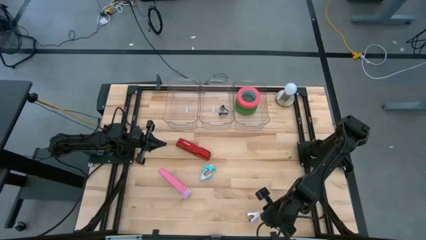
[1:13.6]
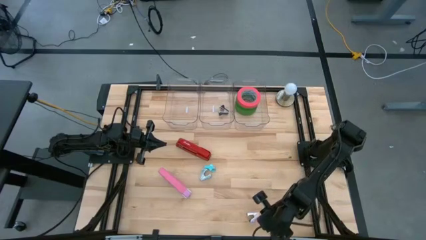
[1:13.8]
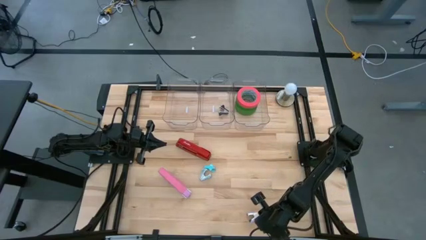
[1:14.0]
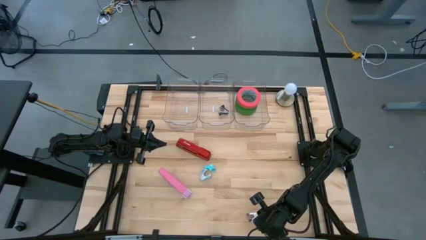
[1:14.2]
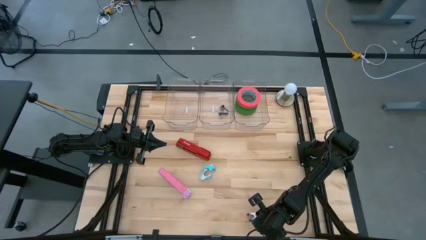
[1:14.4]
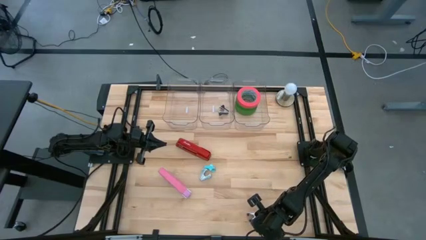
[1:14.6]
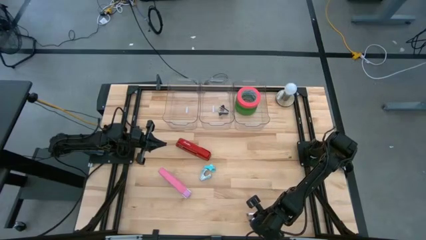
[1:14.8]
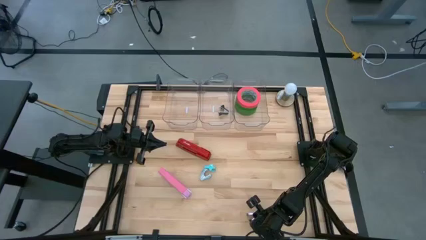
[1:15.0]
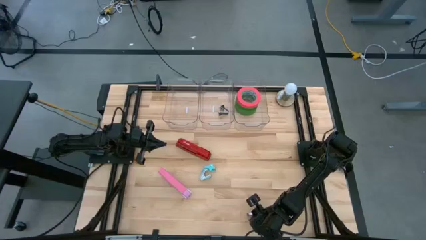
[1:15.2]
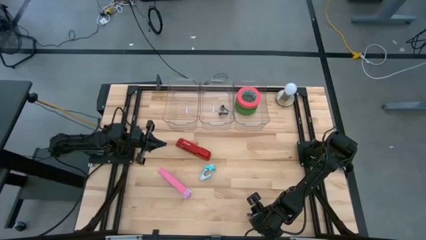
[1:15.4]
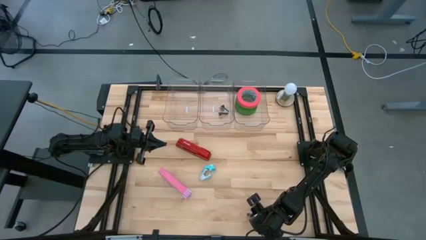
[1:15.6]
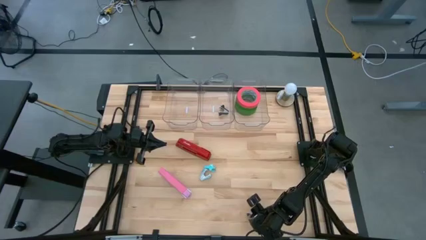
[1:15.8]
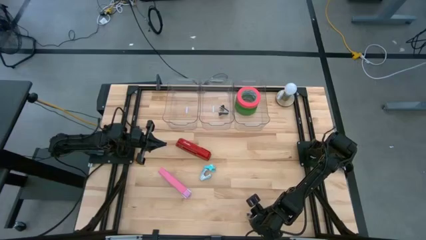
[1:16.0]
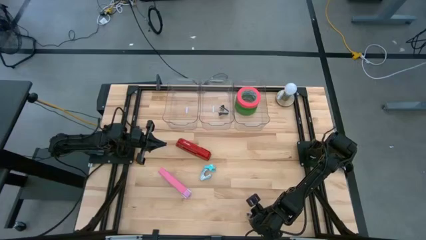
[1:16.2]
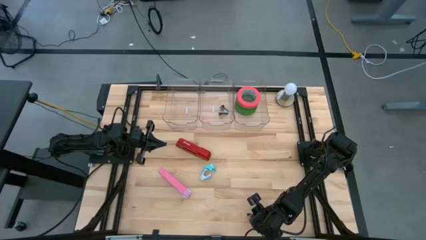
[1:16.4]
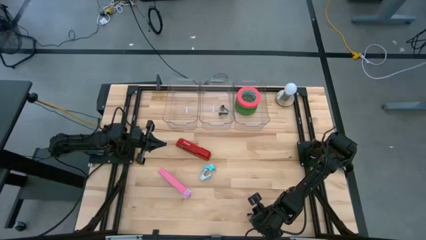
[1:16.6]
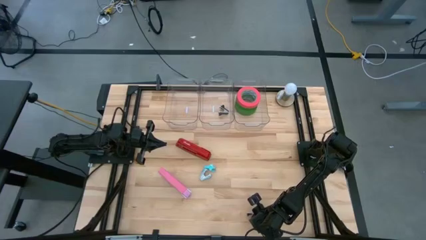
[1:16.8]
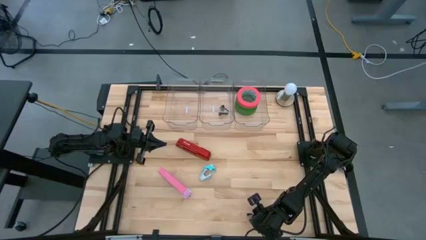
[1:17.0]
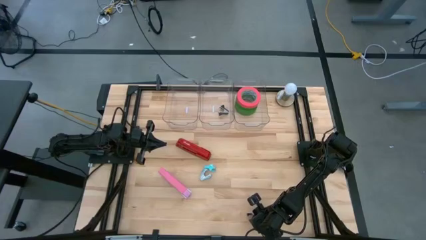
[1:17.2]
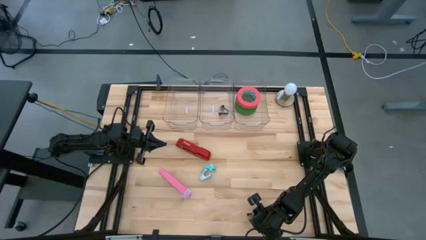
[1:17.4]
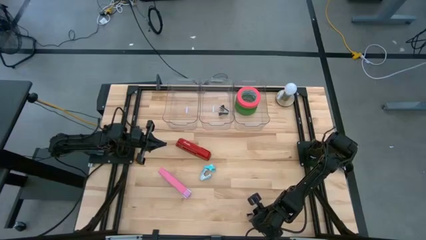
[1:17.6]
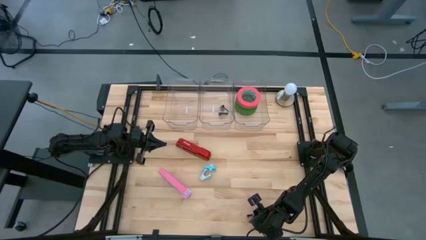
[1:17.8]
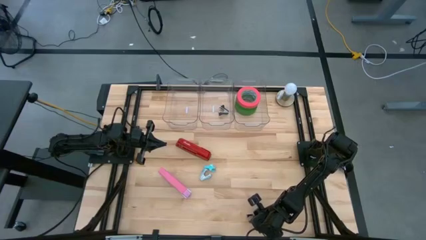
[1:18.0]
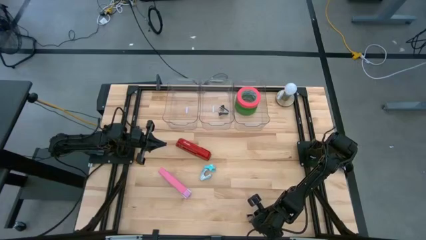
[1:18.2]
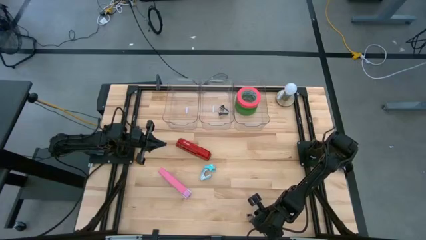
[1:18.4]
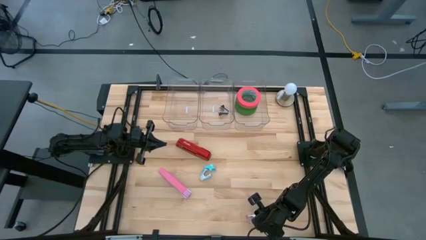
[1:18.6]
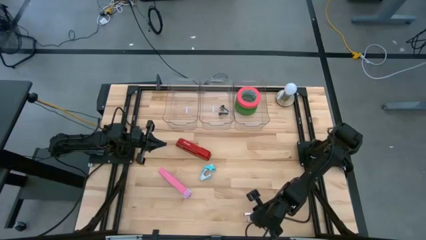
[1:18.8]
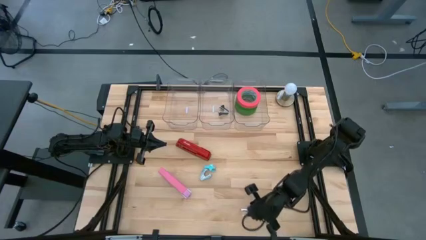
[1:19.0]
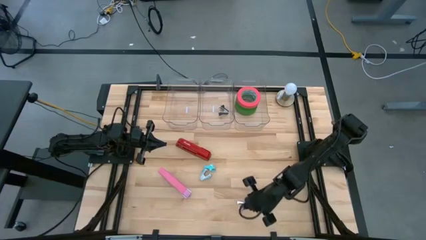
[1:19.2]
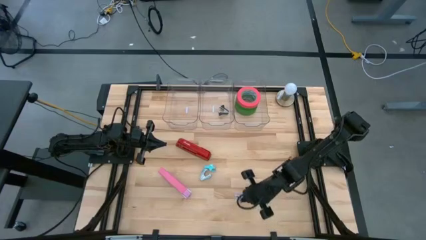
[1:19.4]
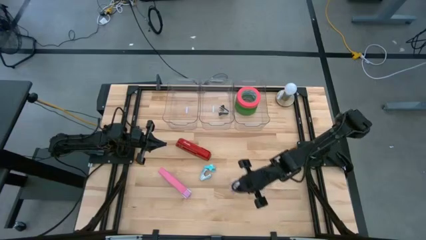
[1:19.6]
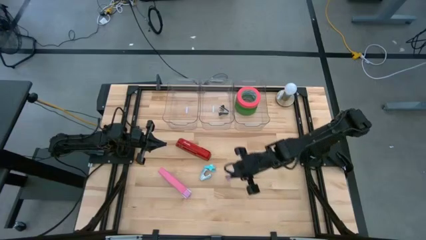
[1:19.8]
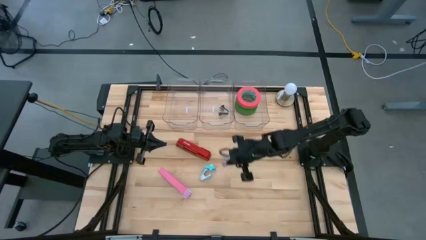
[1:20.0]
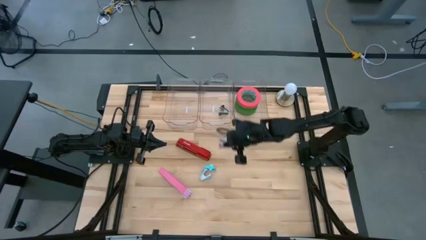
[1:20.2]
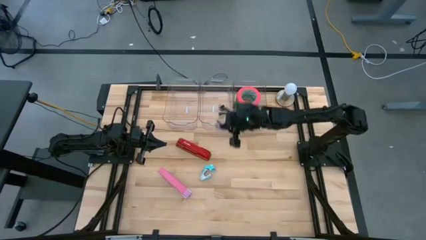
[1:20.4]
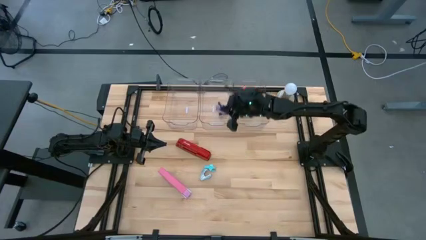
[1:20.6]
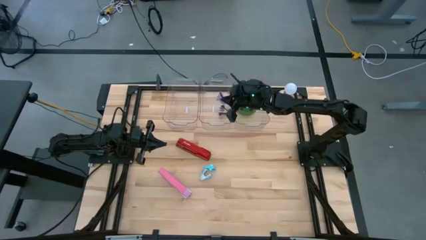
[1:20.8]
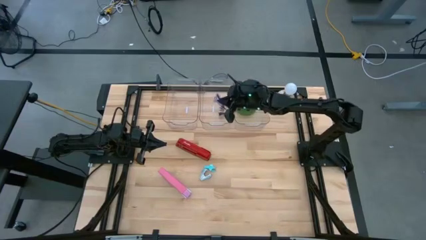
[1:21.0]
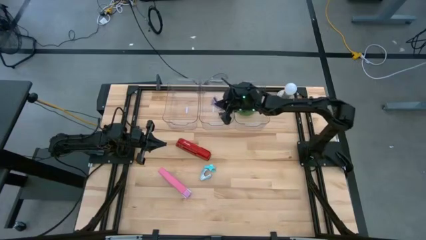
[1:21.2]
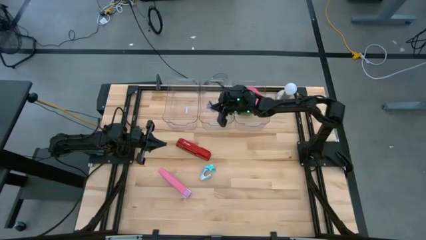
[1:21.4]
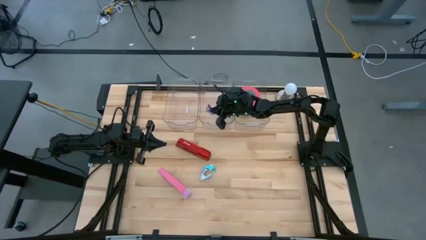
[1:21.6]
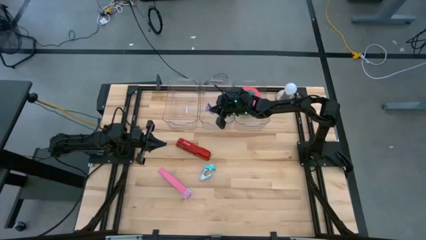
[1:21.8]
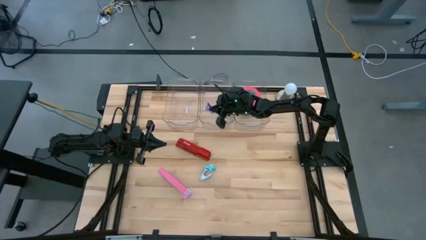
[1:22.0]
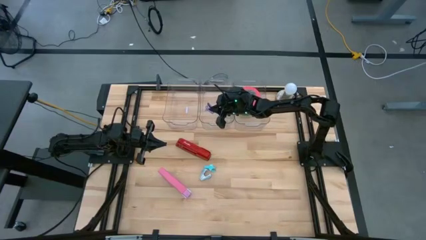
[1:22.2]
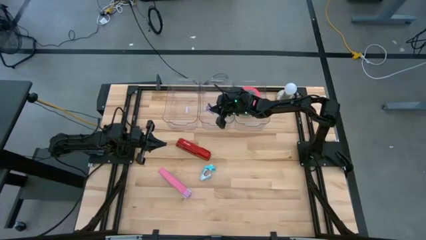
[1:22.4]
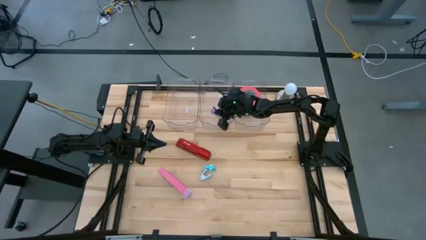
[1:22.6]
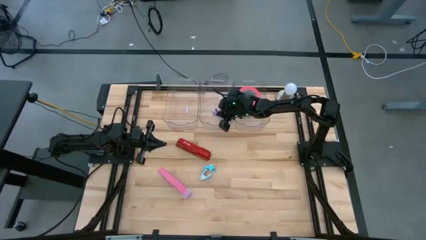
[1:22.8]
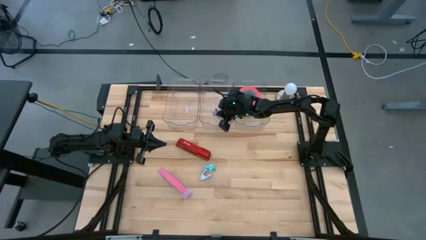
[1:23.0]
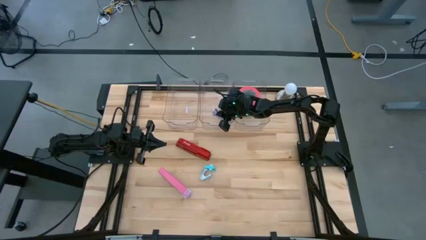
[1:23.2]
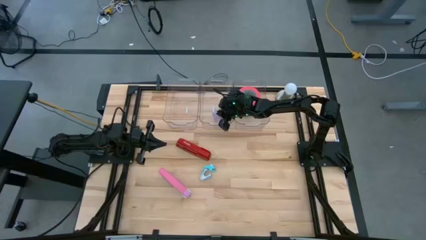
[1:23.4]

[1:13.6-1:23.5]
Task: Pick and place Stapler, Stapler remover, tape
Put the purple staple remover into the middle transparent bin
